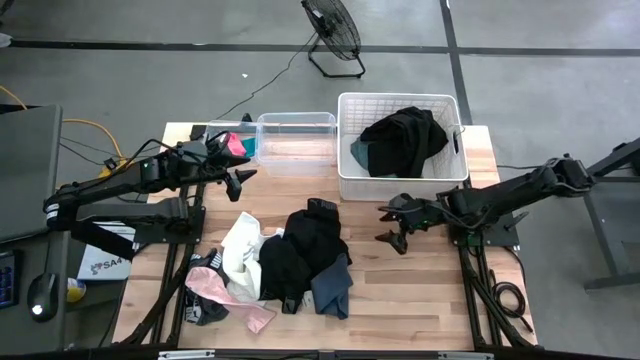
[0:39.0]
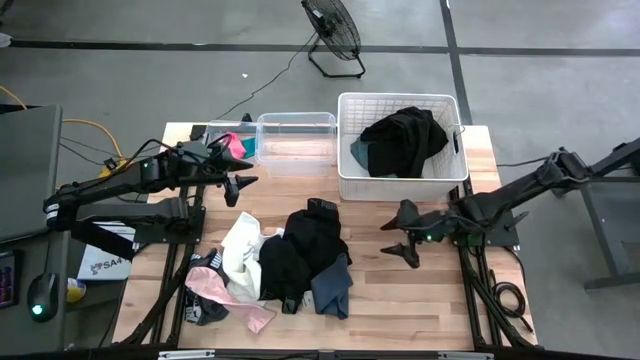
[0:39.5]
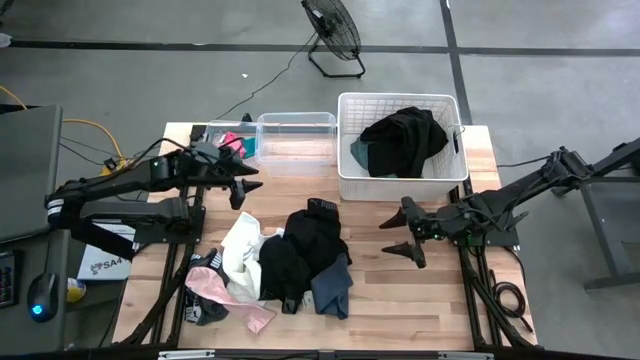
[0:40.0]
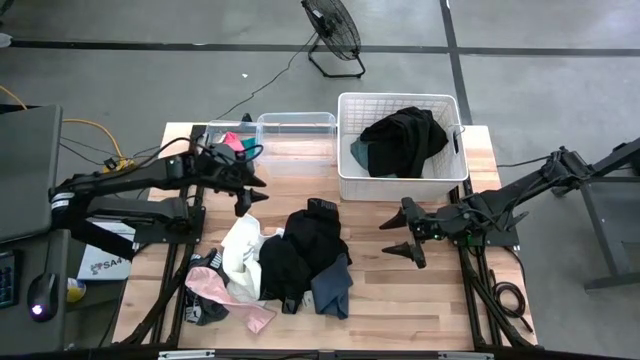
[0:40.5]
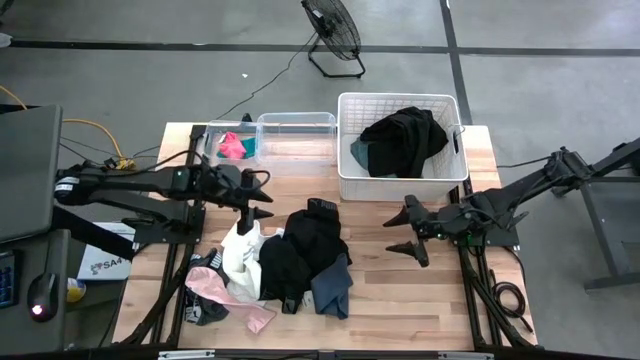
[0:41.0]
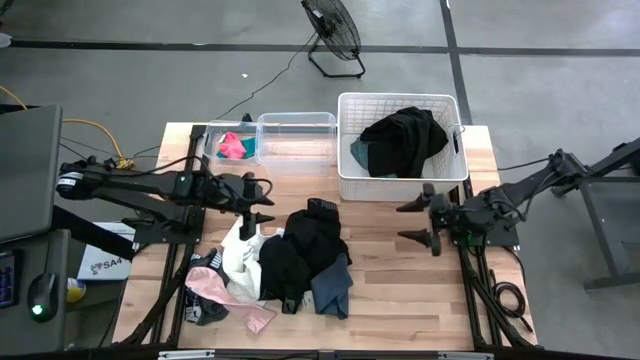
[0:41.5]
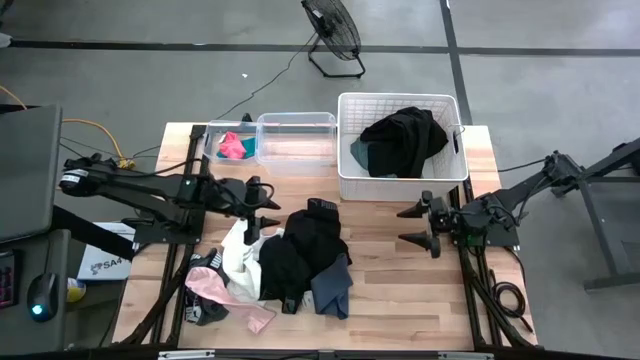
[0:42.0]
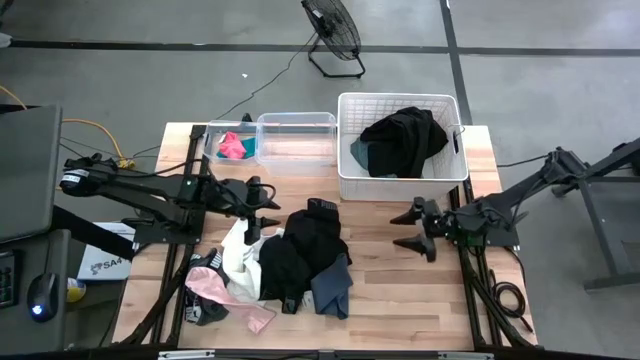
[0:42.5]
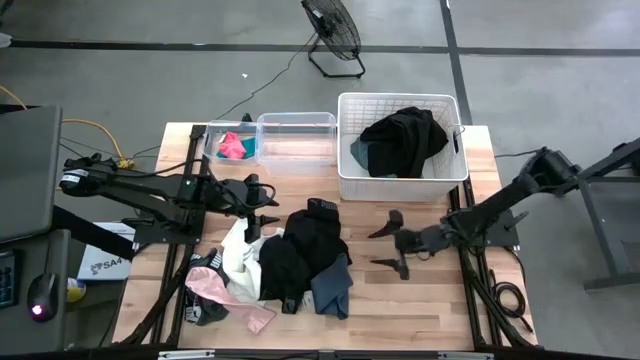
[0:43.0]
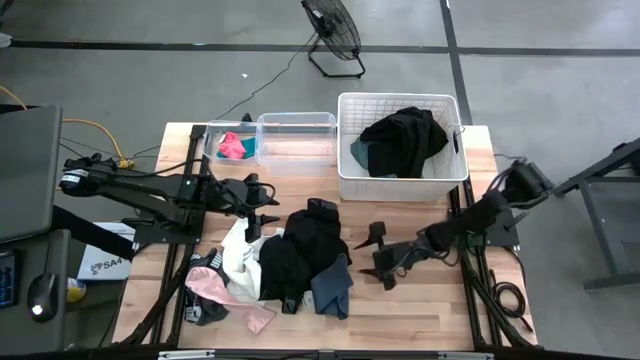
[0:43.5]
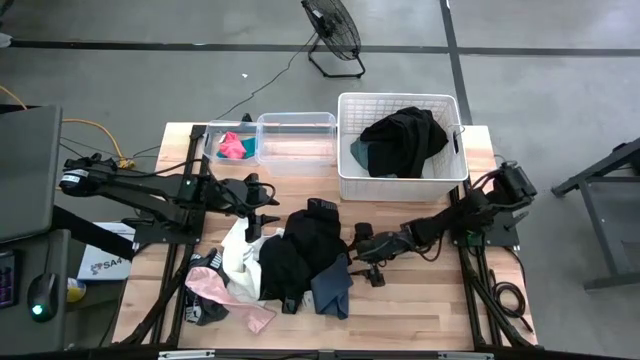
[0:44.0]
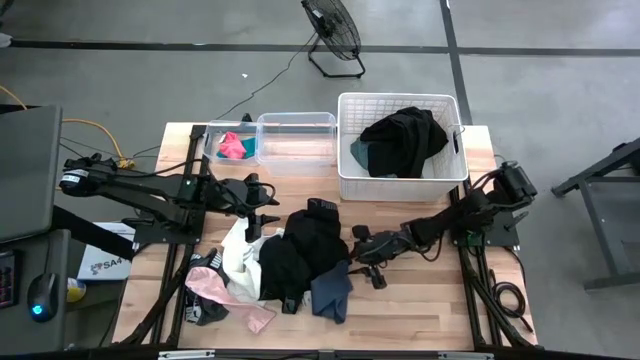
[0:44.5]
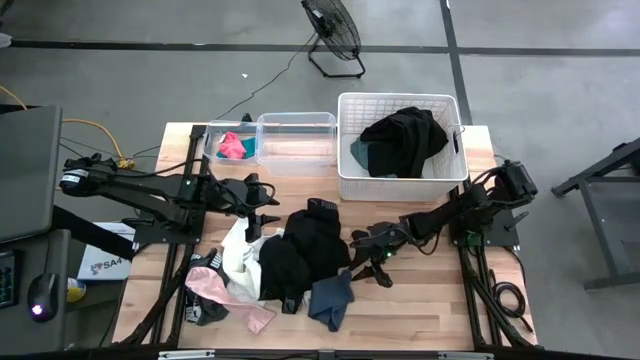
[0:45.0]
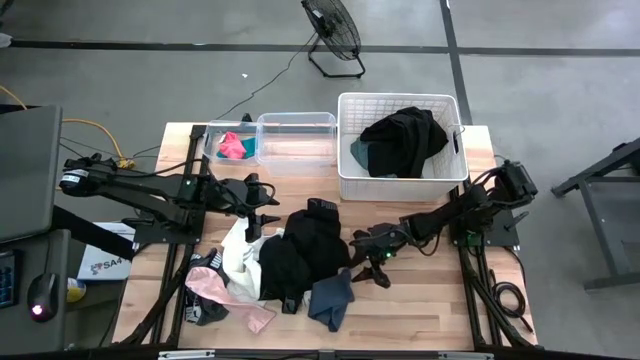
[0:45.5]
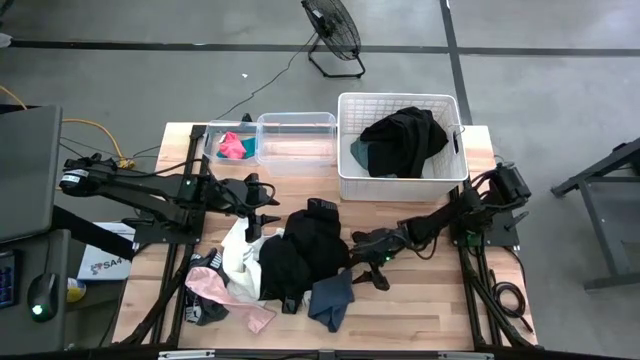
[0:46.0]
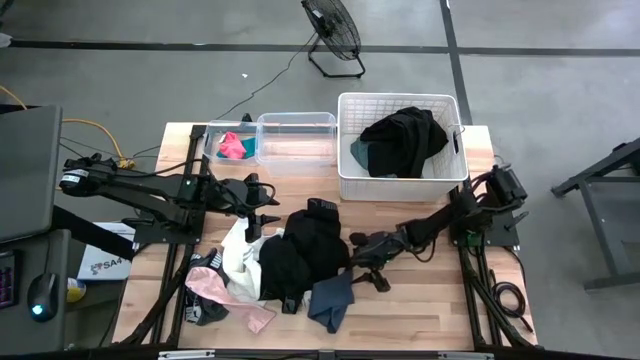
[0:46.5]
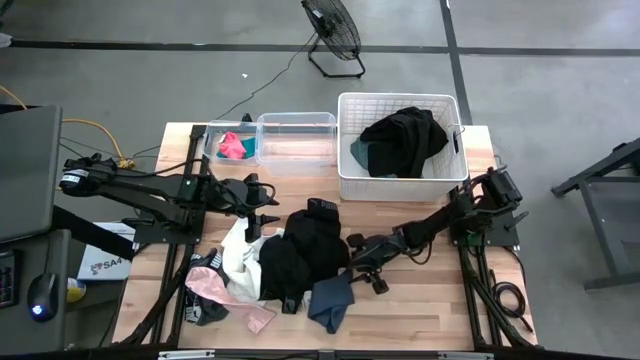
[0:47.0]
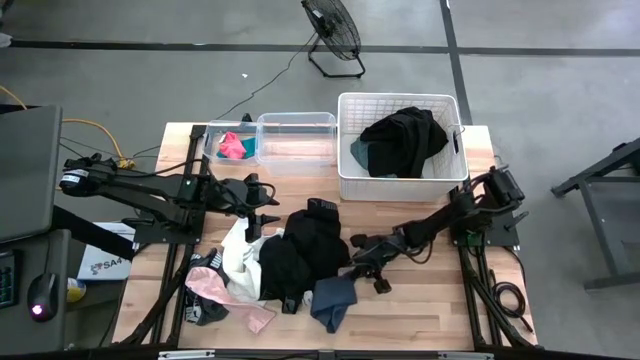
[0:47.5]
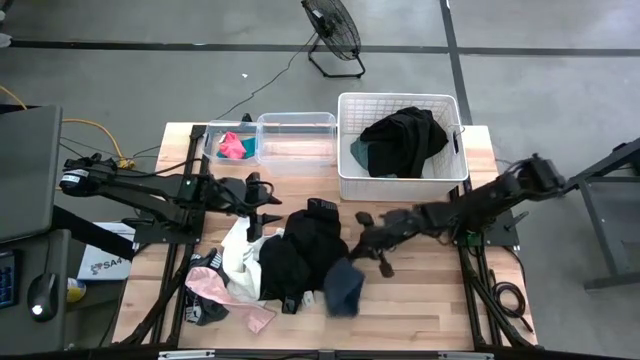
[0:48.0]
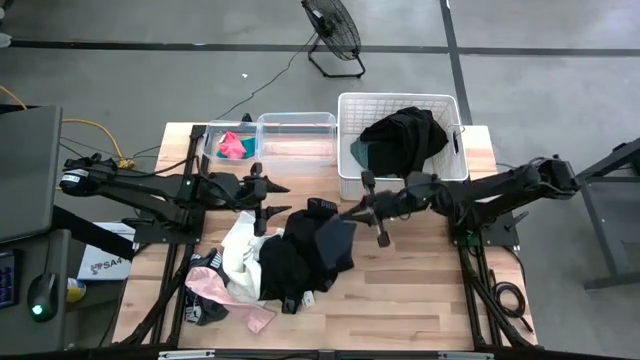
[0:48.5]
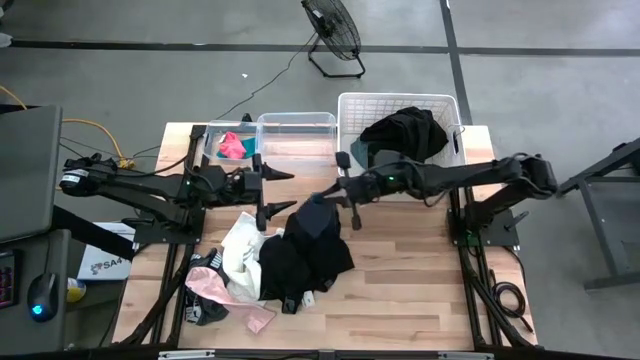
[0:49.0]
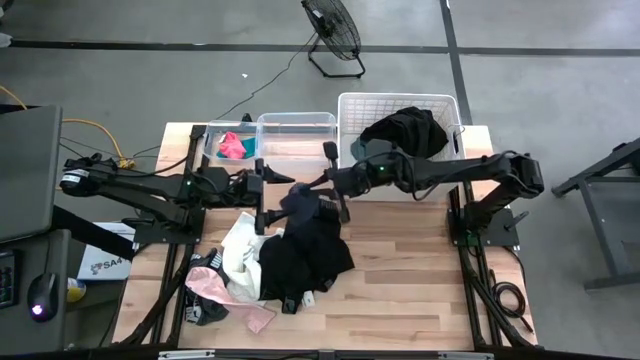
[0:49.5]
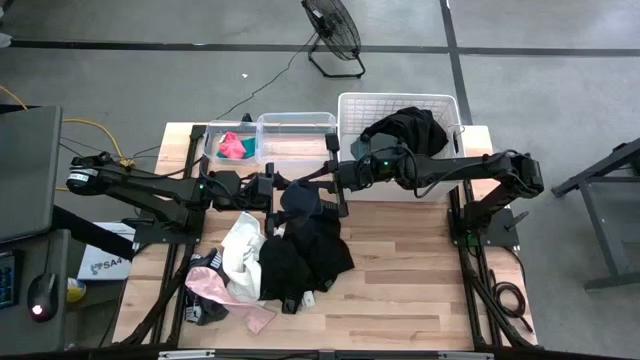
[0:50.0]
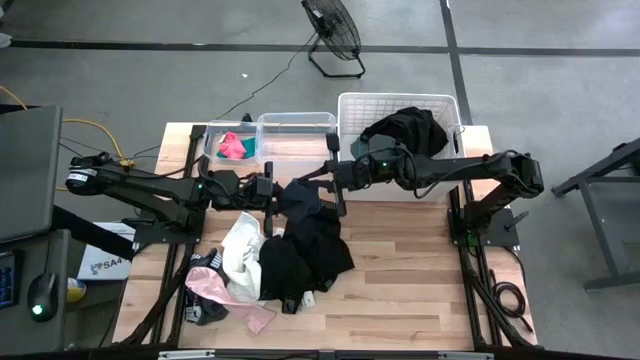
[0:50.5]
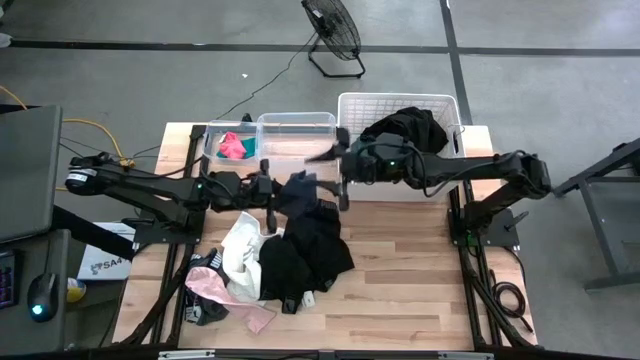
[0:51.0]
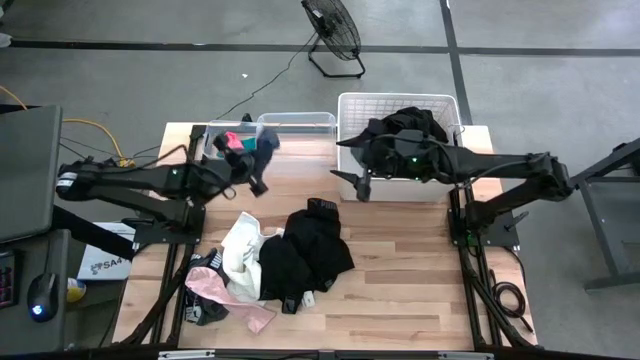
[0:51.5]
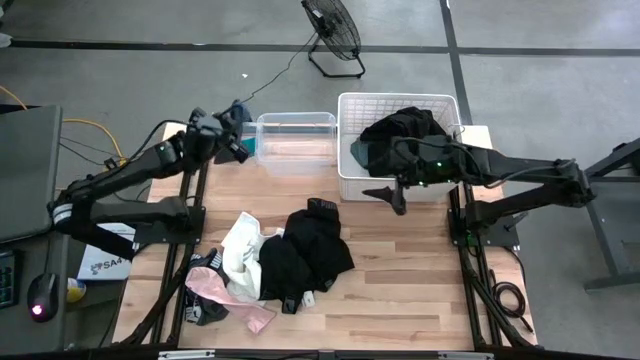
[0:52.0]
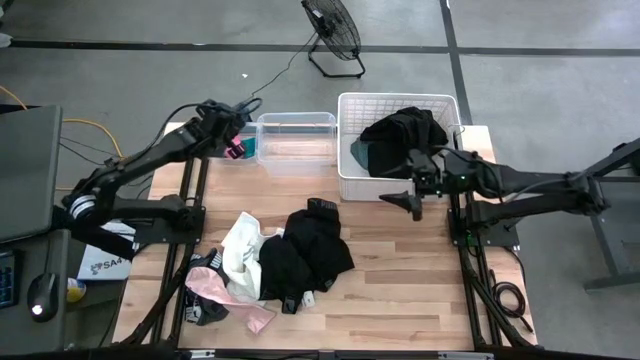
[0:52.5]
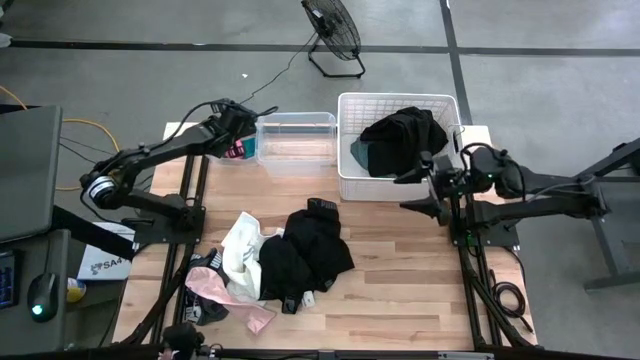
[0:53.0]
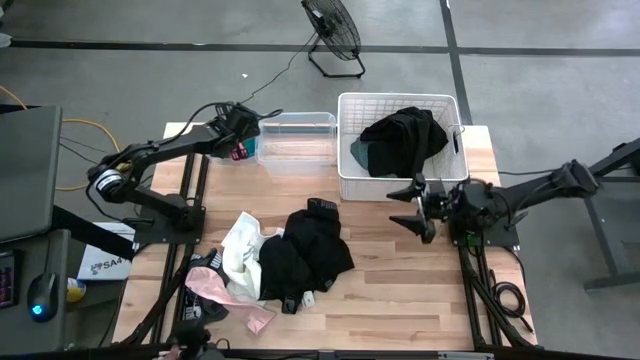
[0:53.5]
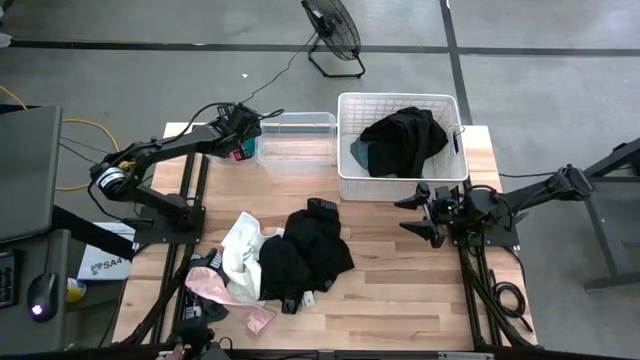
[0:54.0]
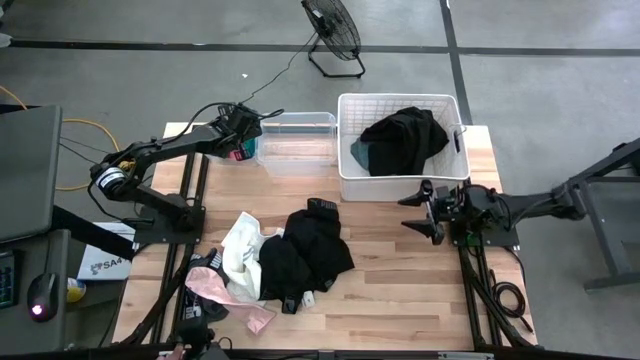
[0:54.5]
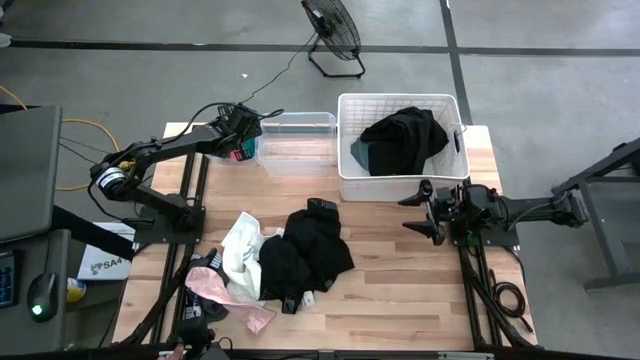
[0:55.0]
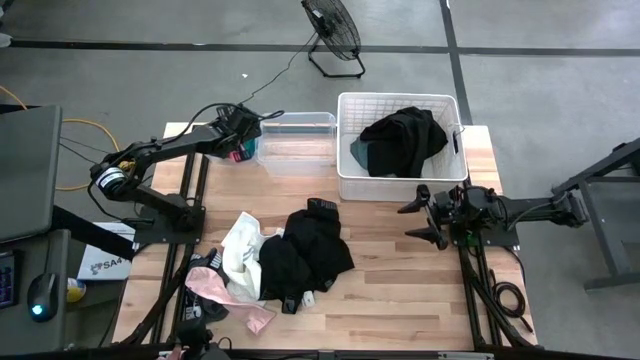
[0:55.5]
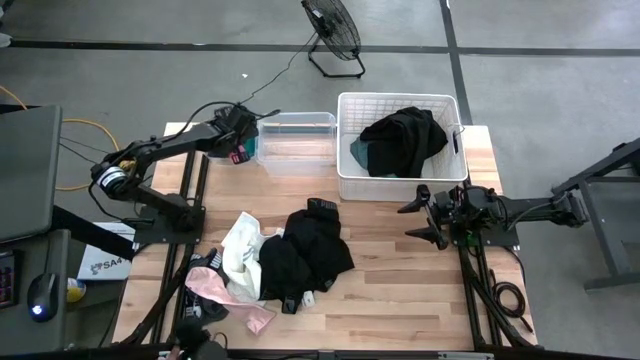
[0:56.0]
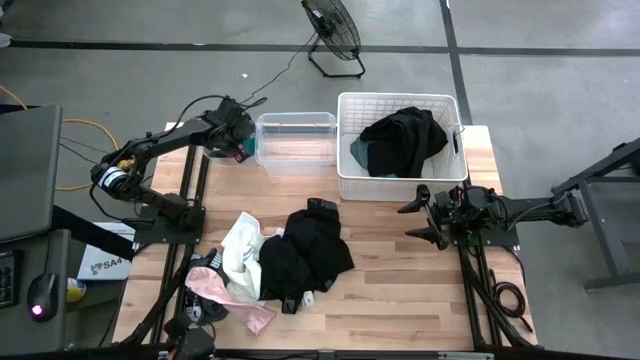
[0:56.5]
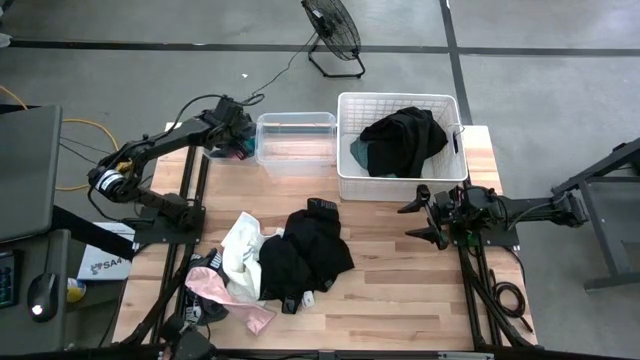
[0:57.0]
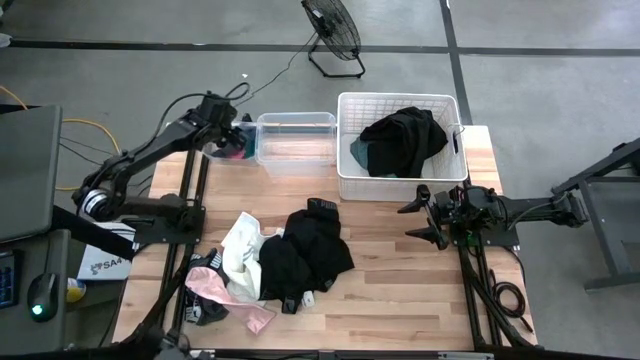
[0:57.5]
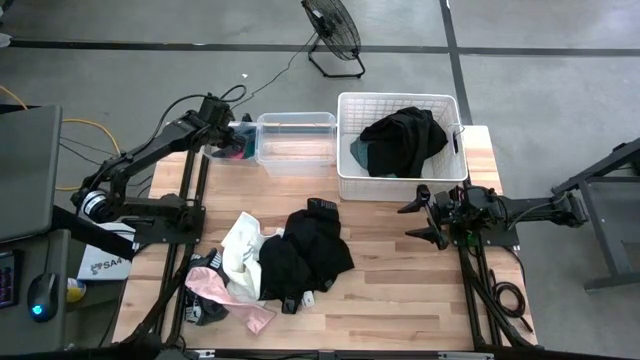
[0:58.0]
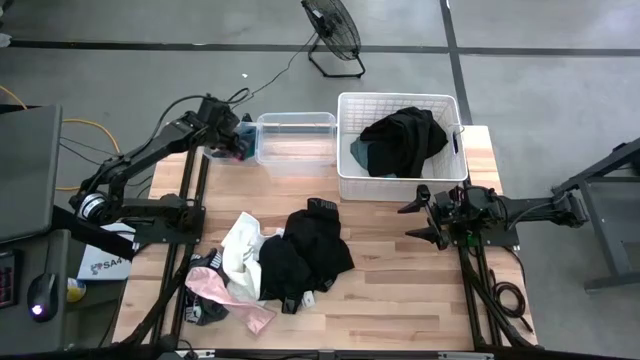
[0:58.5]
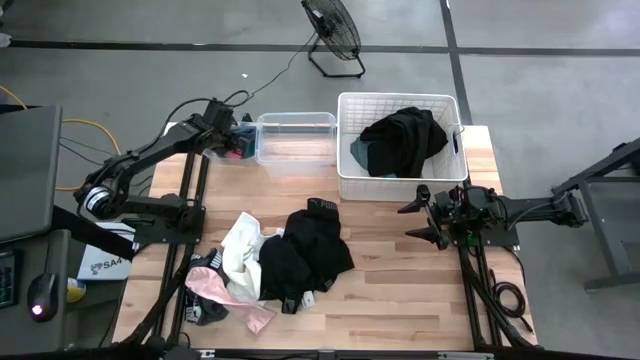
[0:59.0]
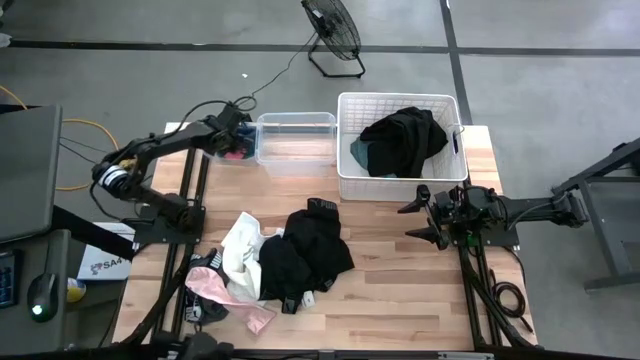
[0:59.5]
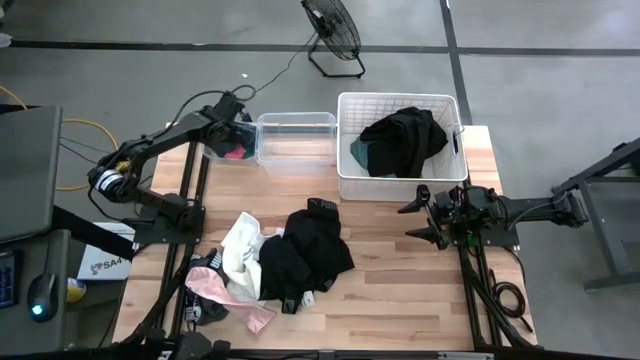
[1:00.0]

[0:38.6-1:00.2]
Task: Pick & Place Cloths
Put the dark blue sock into the left transparent bin
